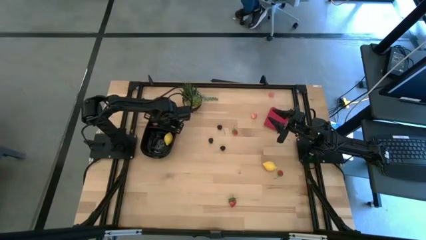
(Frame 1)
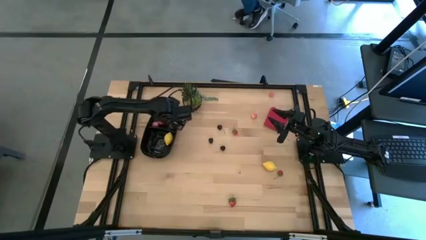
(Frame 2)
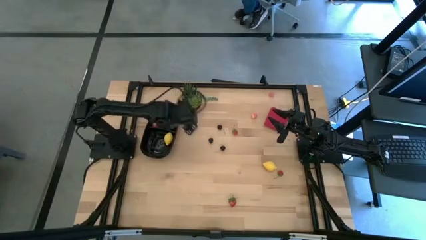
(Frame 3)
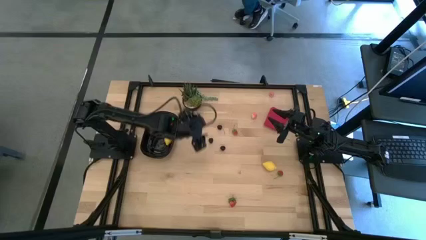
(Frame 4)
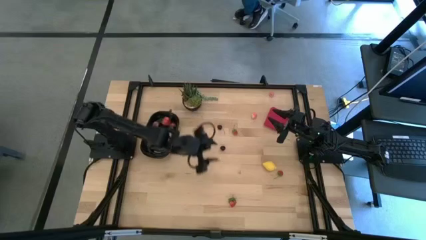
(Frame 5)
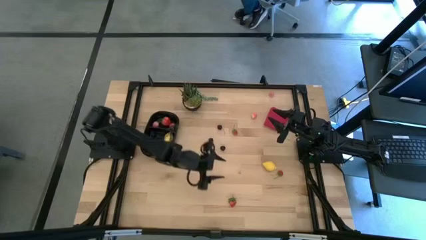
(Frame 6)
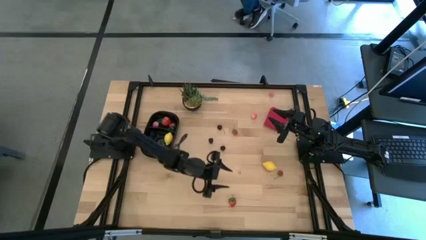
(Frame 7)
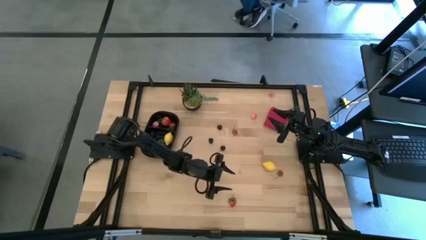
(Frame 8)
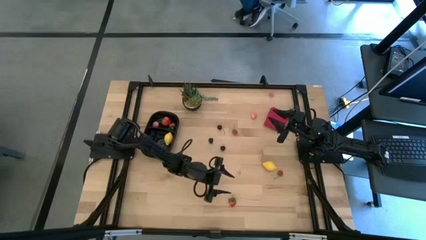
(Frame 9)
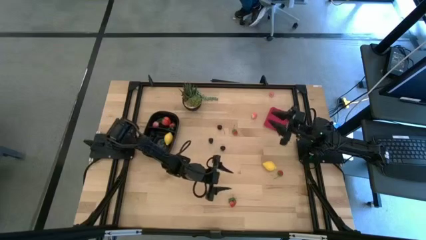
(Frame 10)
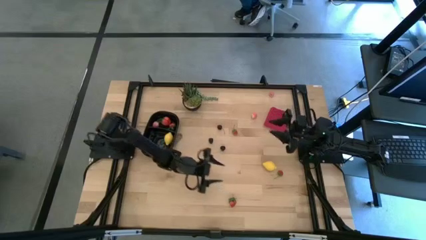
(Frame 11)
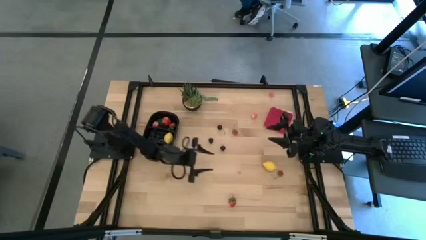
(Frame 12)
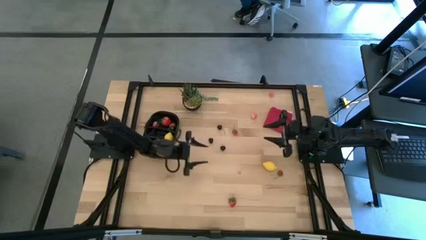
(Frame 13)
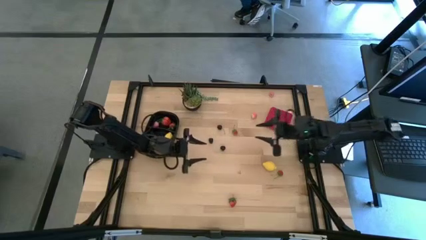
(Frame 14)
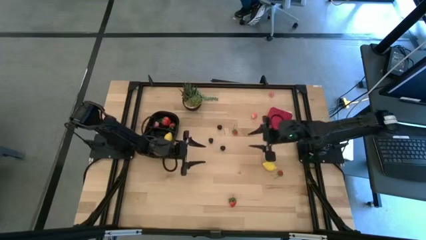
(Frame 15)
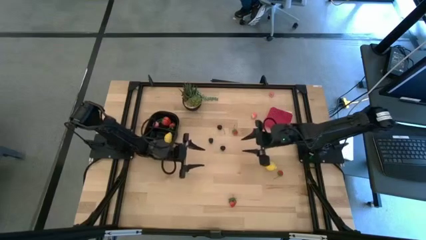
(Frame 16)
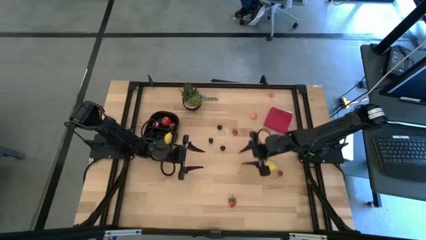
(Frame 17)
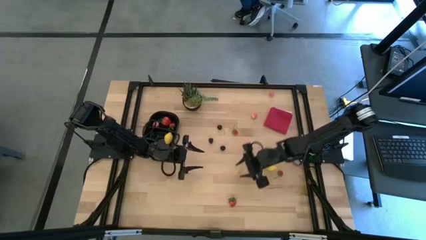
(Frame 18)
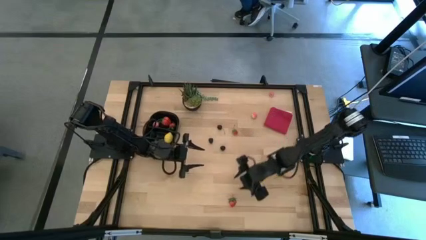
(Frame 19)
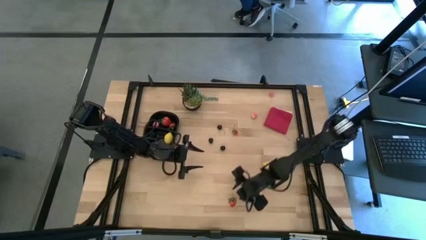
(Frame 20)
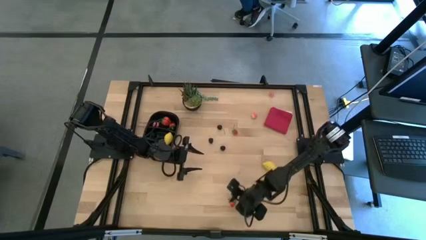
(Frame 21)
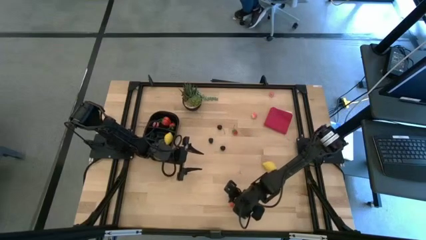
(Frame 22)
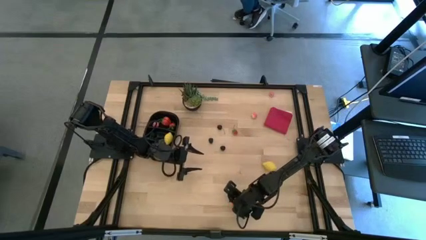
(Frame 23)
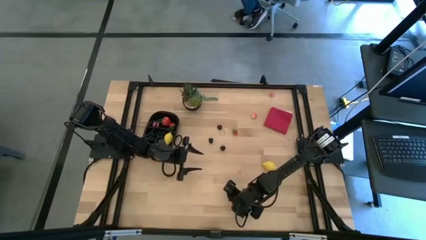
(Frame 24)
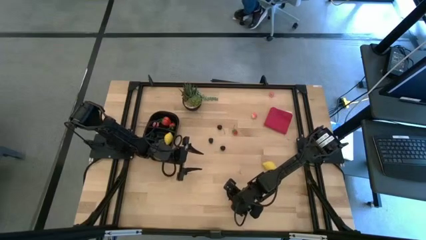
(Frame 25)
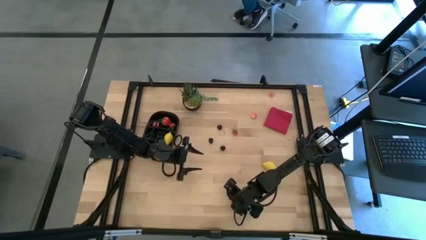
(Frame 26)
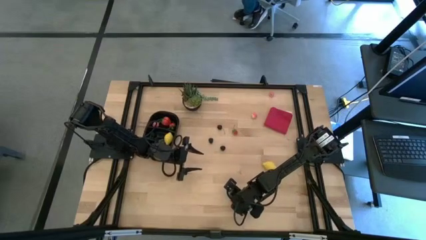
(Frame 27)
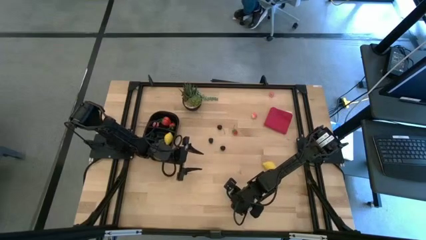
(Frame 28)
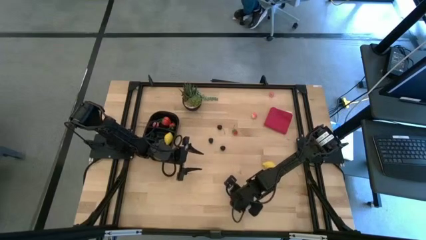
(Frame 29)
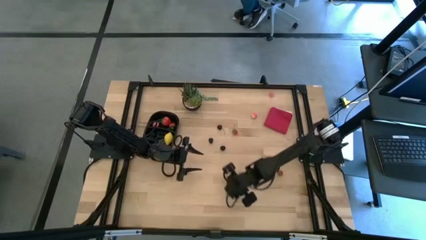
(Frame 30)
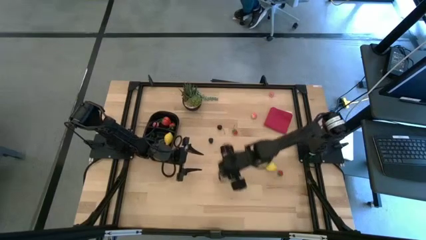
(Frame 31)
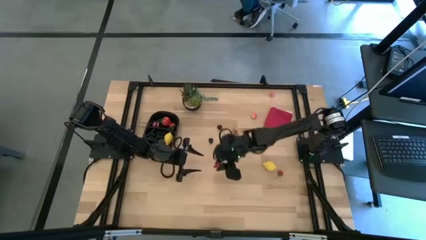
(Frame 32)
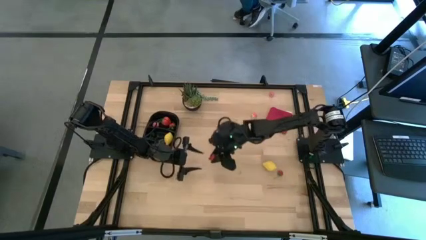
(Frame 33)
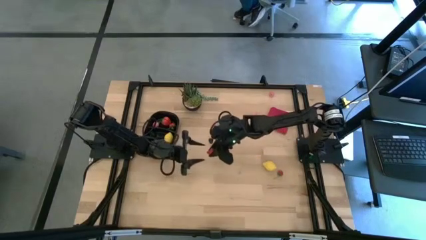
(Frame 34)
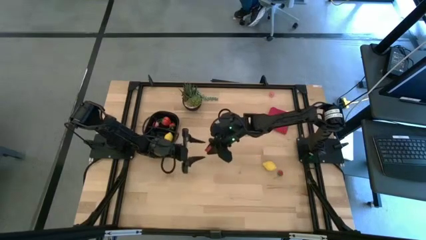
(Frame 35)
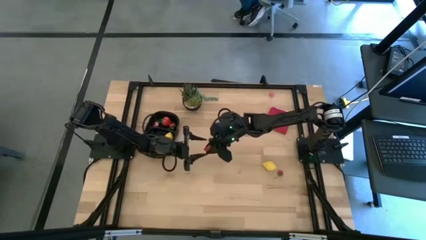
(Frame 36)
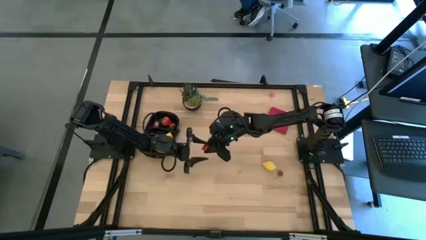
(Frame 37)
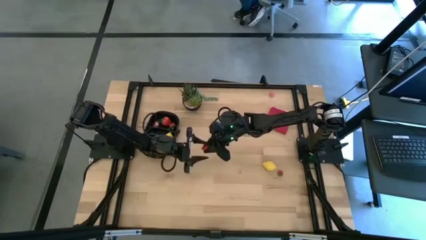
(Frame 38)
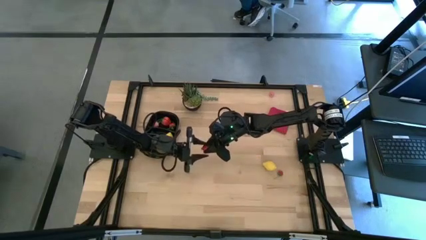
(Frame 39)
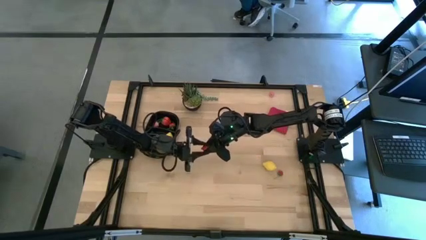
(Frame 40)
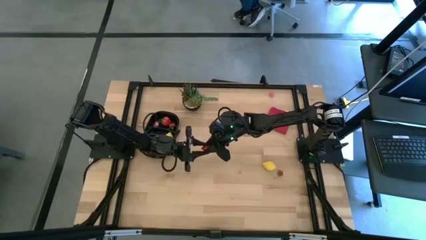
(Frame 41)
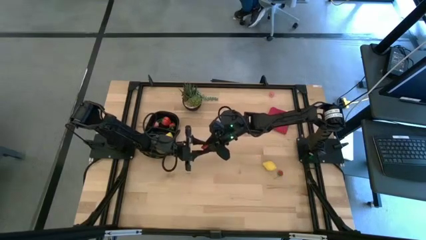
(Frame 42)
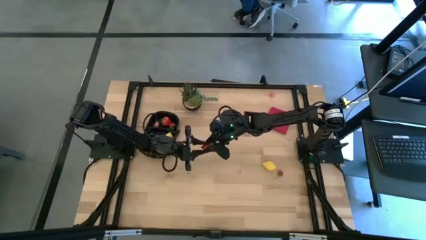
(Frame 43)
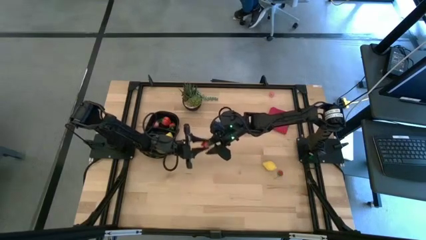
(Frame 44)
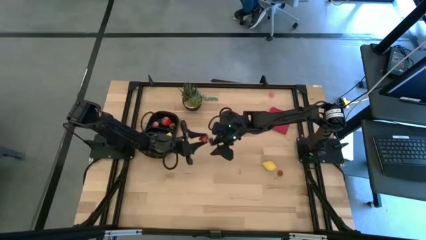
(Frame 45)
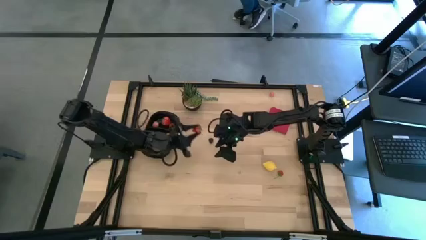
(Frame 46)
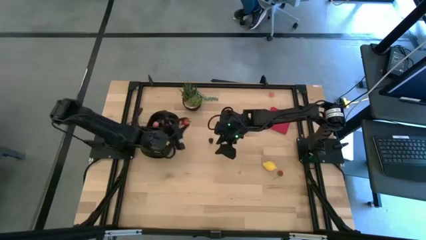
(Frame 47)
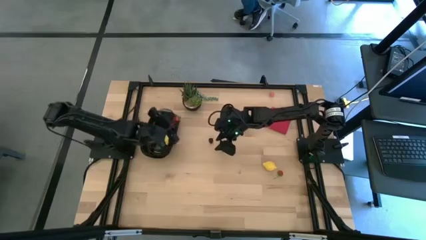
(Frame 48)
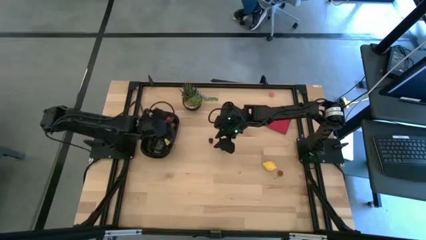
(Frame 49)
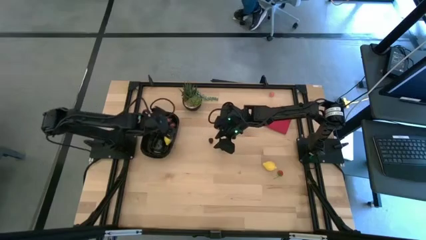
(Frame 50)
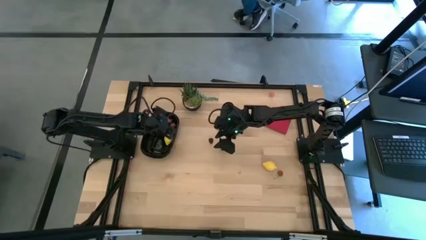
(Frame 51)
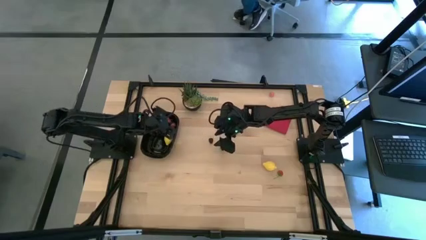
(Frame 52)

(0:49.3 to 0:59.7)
Task: Pick and placing Produce into tupperware
Put the red strawberry into the black container

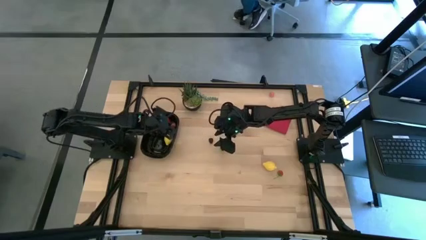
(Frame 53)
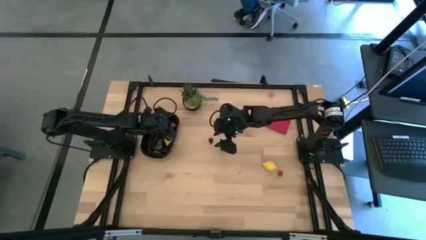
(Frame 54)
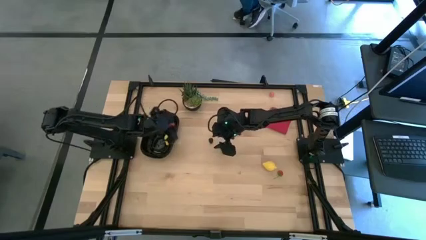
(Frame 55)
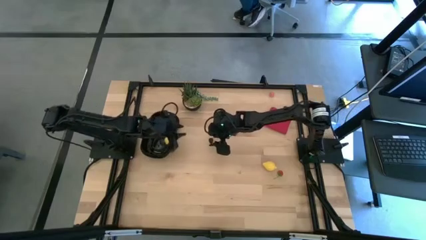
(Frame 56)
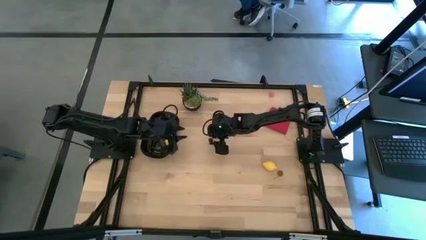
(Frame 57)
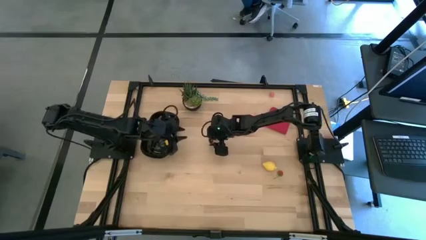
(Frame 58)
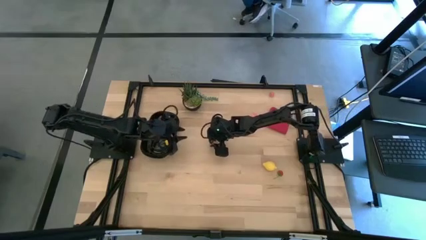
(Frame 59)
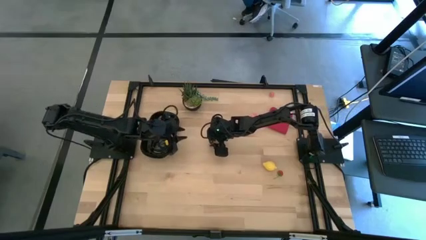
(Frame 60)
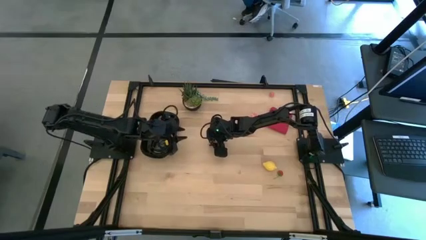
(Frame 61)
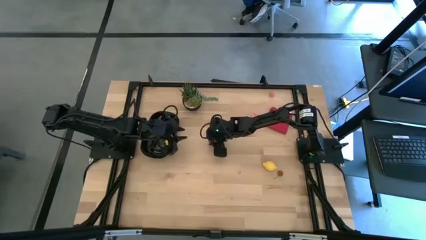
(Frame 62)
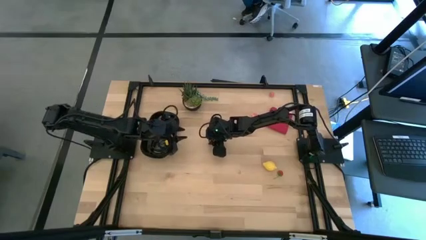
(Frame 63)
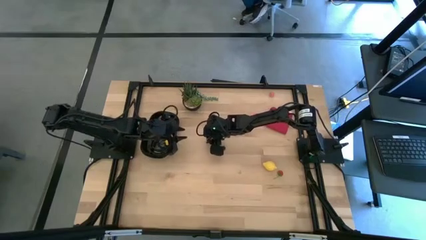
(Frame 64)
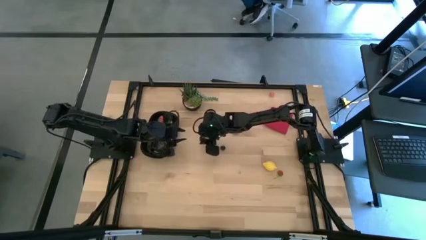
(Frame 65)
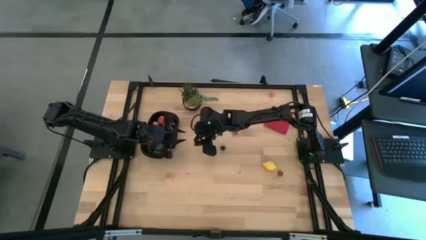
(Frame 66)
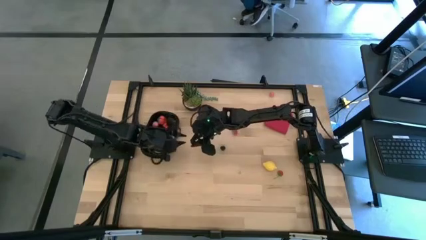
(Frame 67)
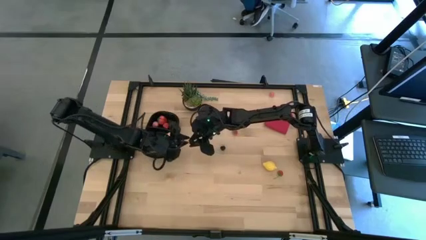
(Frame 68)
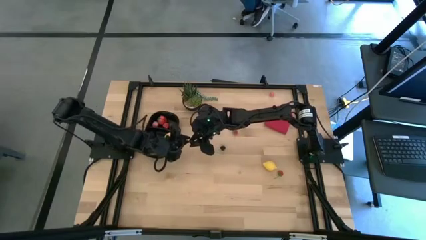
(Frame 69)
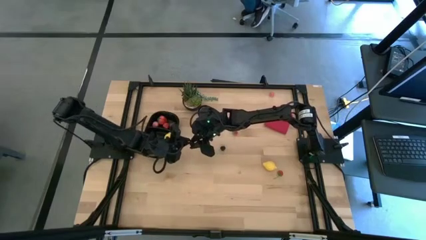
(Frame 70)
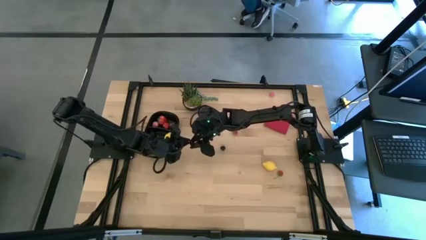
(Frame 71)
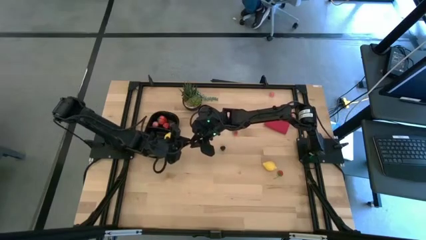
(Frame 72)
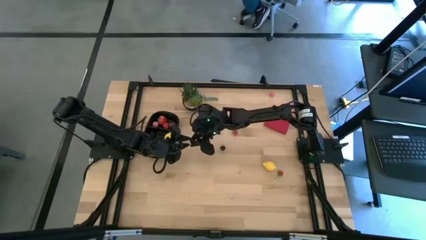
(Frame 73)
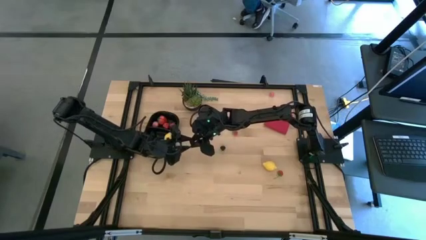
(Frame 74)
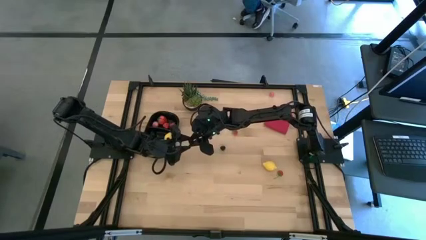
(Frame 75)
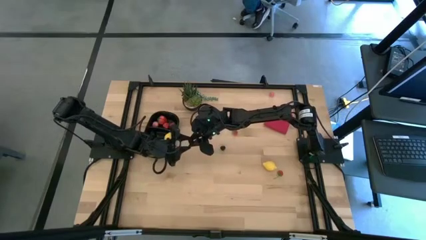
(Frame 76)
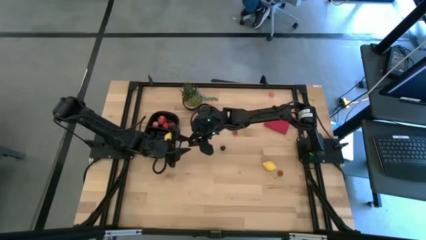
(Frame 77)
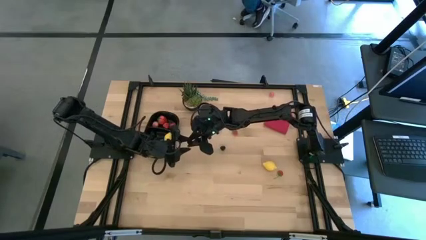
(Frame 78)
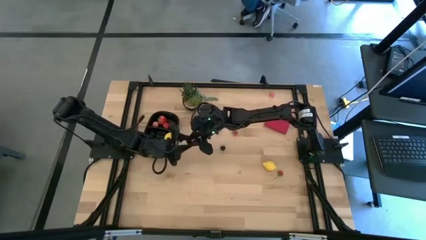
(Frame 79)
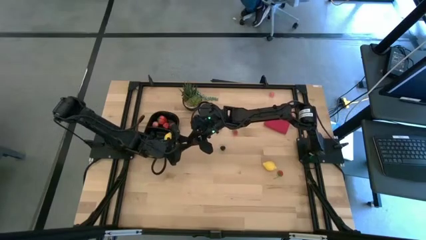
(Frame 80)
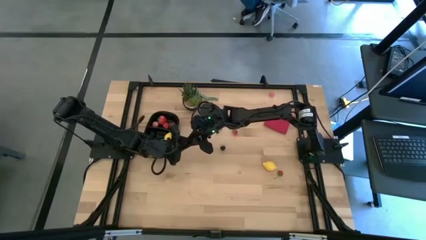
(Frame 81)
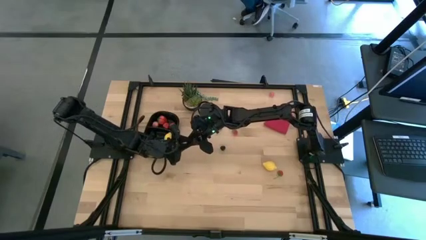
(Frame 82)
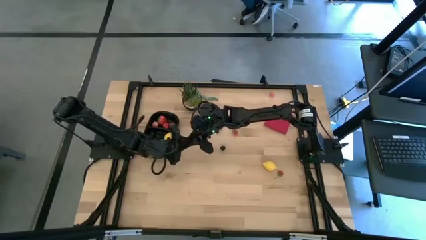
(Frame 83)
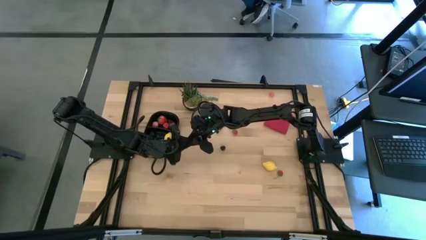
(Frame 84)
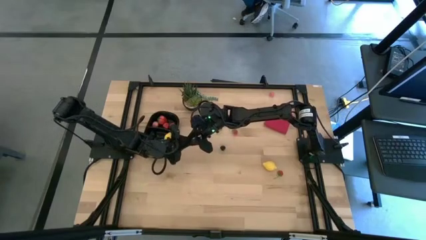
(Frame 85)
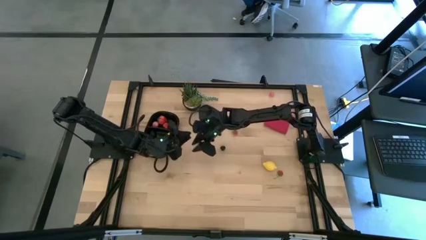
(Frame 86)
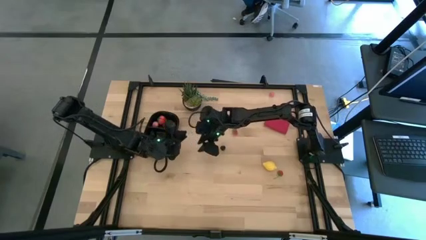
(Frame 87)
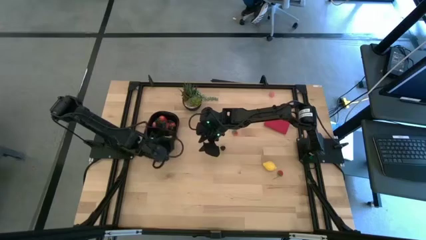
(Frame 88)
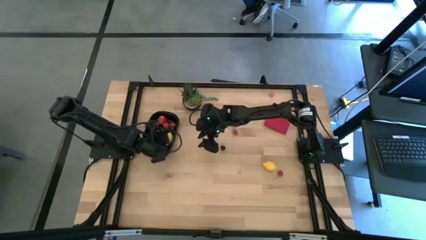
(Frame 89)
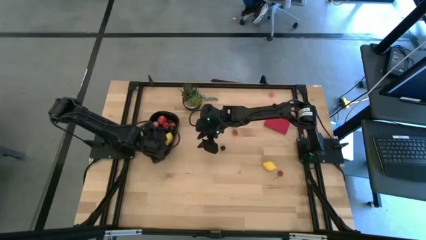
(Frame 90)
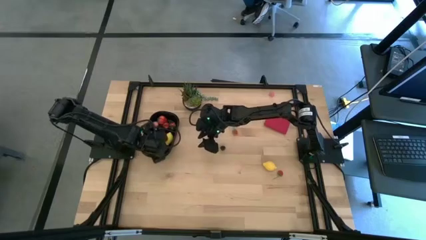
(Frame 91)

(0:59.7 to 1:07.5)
Put the blackberry into the black container
